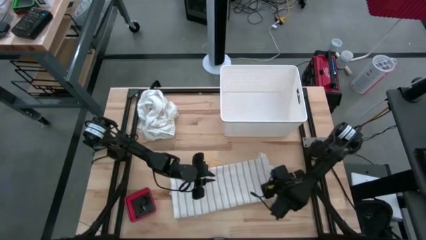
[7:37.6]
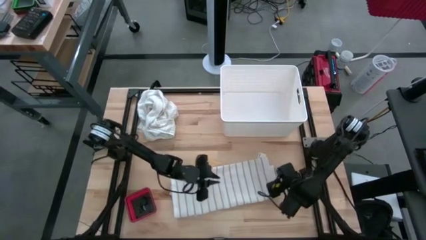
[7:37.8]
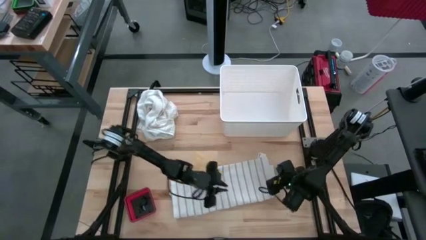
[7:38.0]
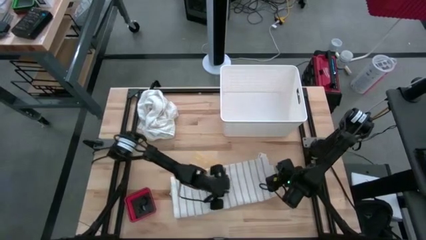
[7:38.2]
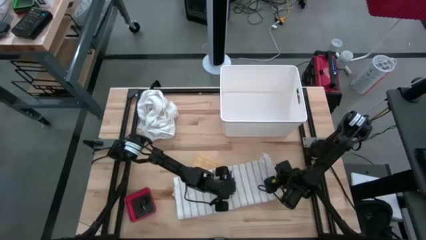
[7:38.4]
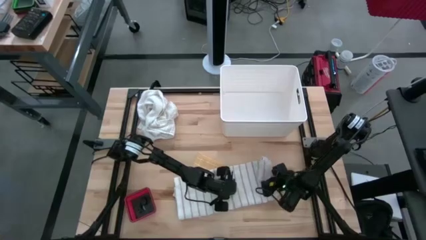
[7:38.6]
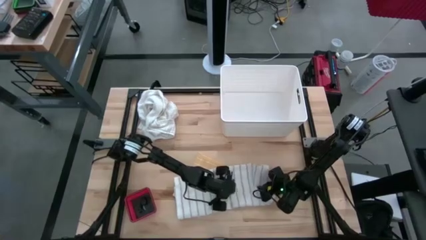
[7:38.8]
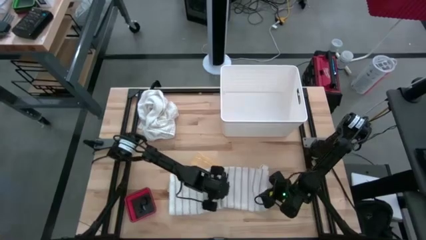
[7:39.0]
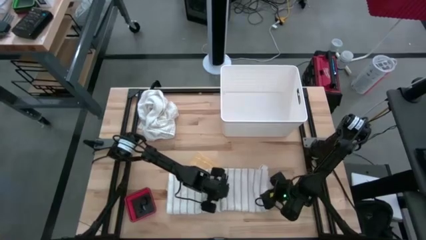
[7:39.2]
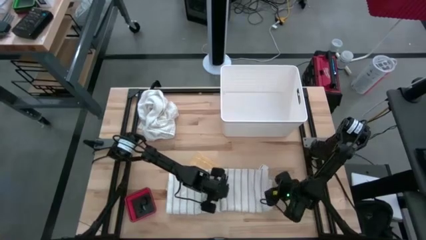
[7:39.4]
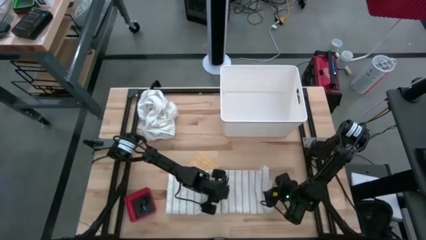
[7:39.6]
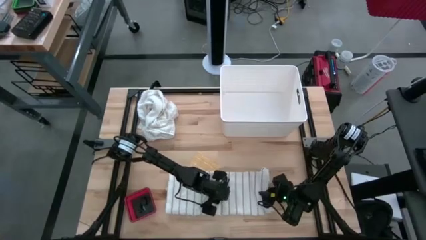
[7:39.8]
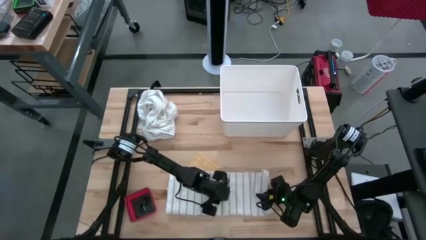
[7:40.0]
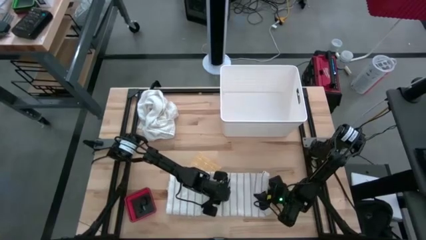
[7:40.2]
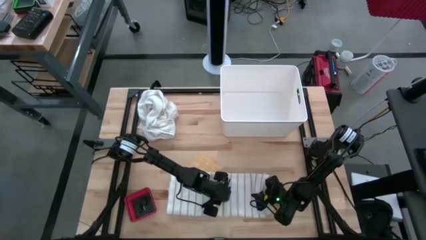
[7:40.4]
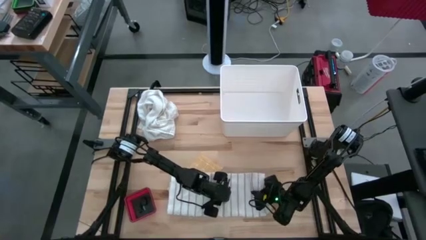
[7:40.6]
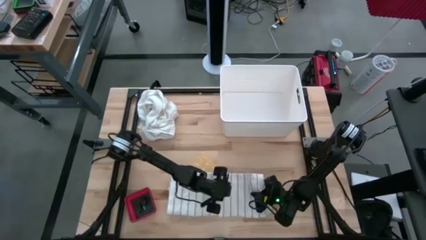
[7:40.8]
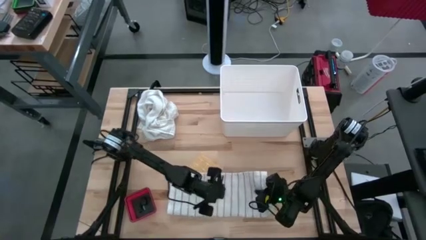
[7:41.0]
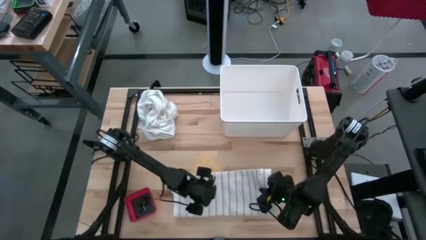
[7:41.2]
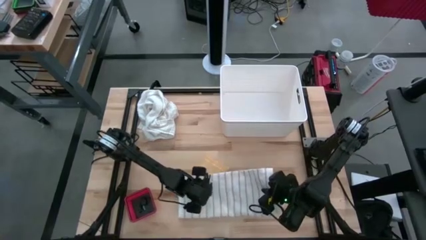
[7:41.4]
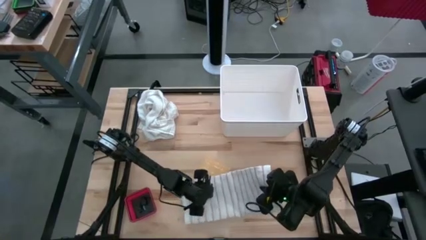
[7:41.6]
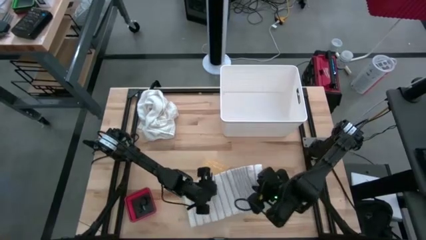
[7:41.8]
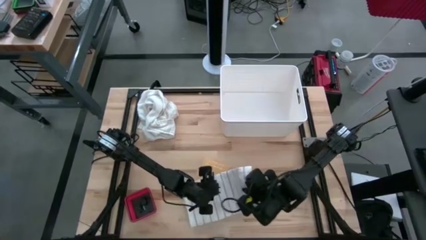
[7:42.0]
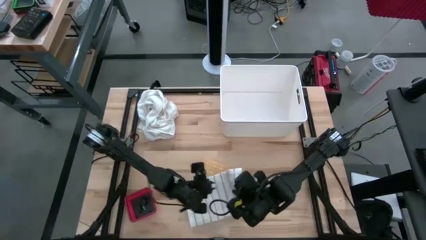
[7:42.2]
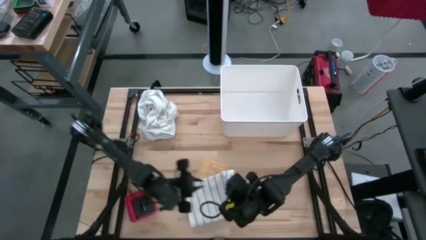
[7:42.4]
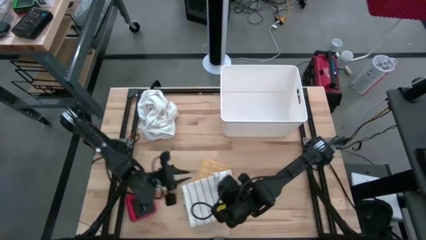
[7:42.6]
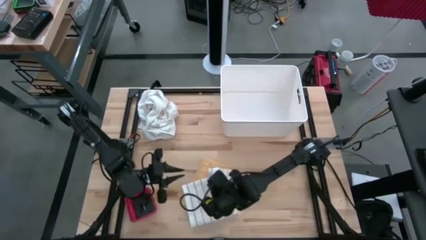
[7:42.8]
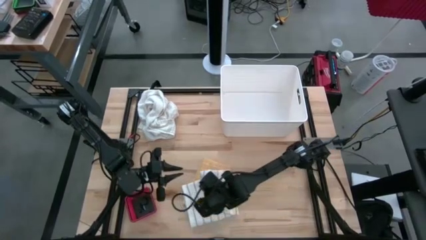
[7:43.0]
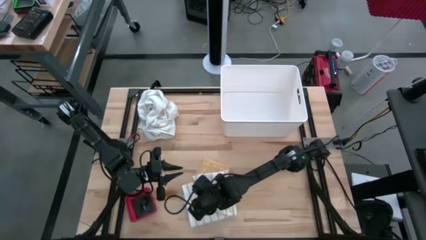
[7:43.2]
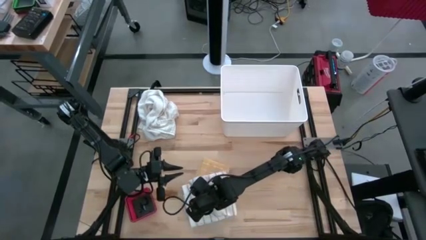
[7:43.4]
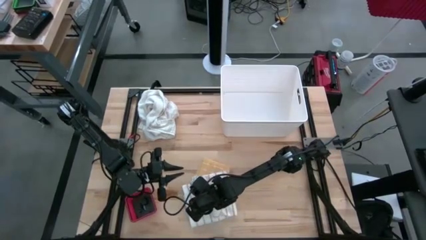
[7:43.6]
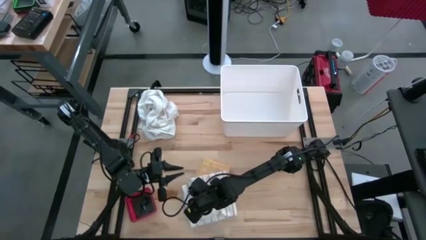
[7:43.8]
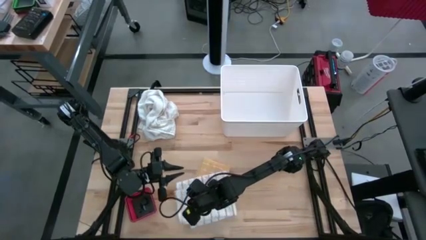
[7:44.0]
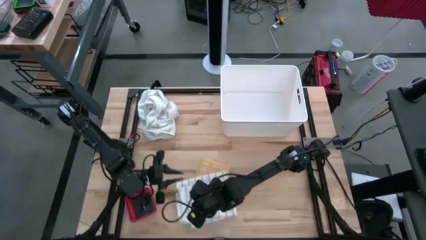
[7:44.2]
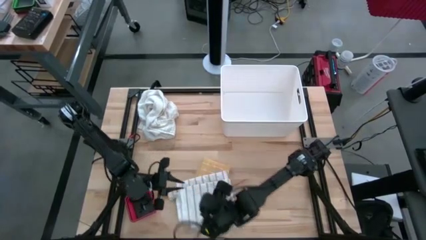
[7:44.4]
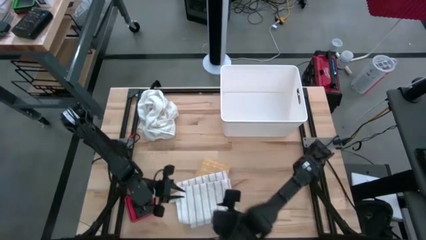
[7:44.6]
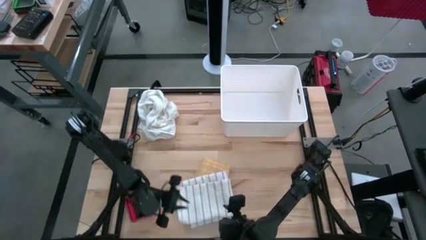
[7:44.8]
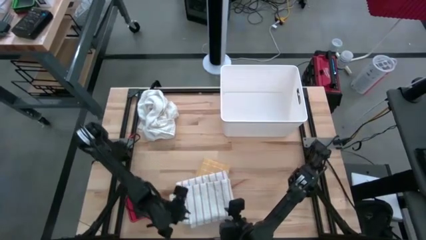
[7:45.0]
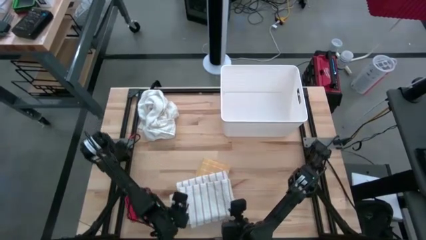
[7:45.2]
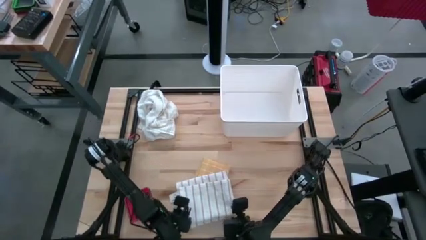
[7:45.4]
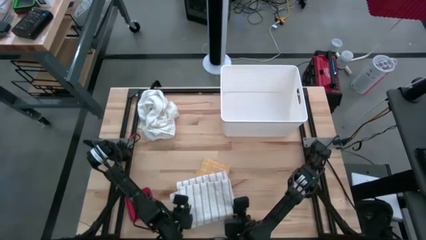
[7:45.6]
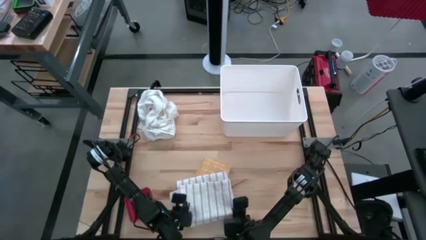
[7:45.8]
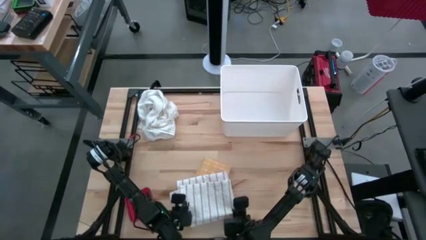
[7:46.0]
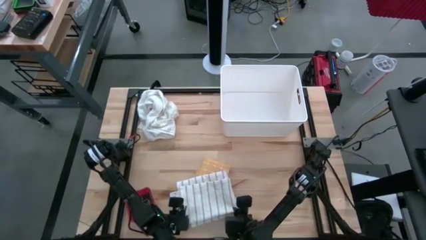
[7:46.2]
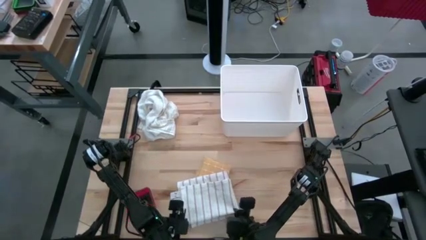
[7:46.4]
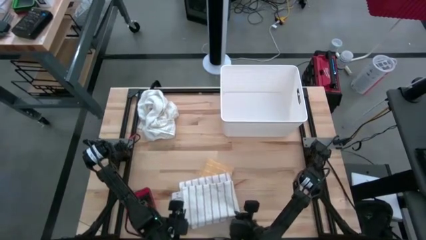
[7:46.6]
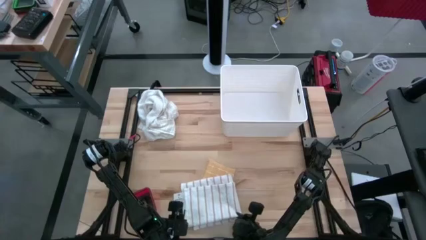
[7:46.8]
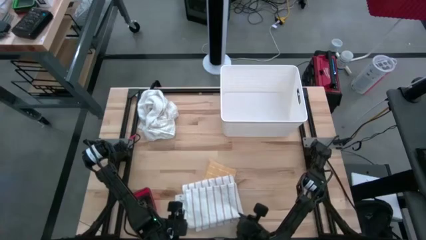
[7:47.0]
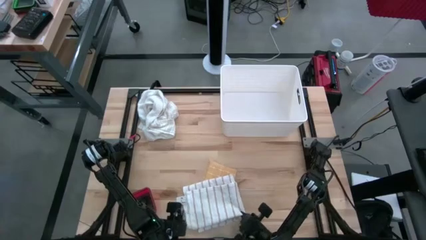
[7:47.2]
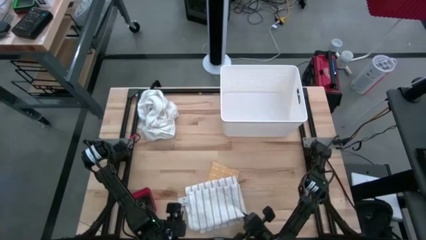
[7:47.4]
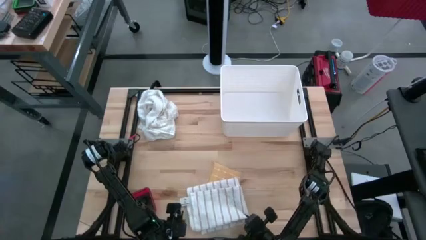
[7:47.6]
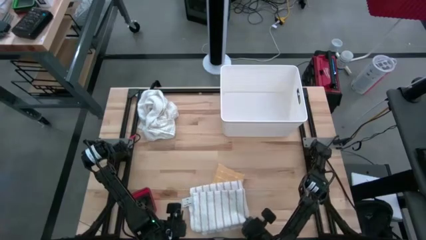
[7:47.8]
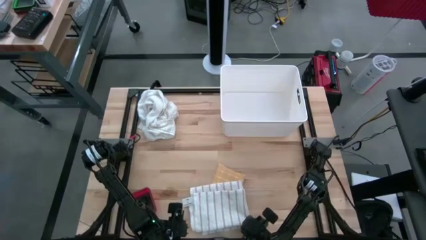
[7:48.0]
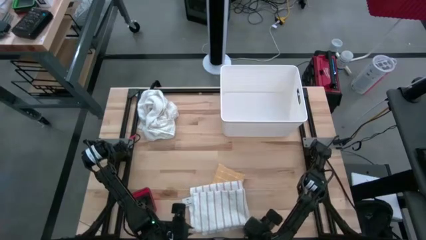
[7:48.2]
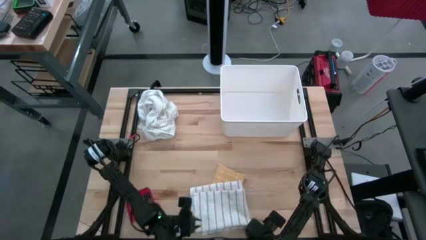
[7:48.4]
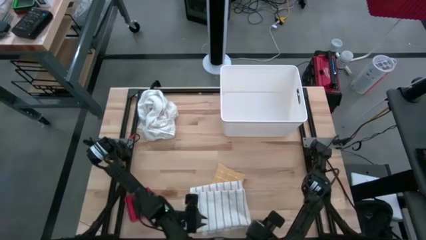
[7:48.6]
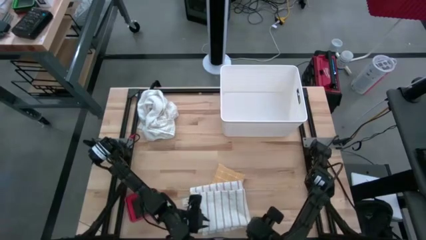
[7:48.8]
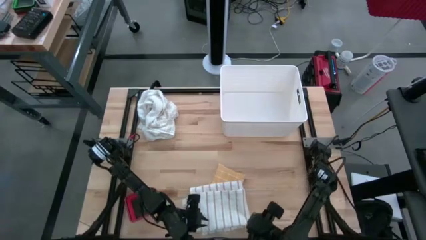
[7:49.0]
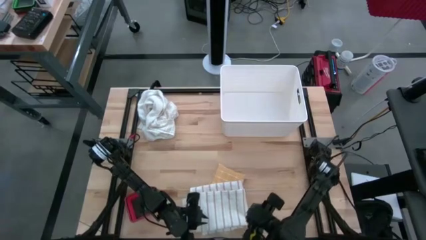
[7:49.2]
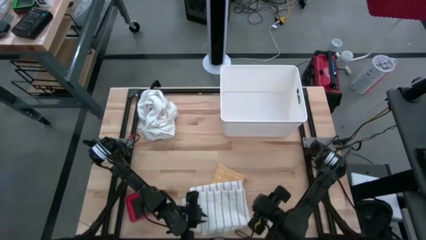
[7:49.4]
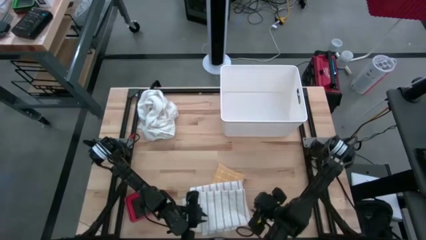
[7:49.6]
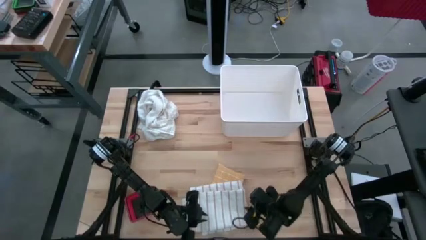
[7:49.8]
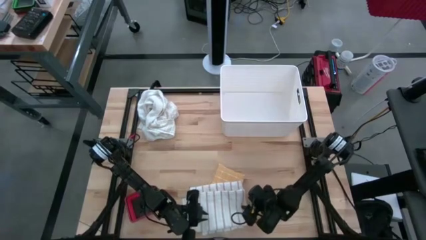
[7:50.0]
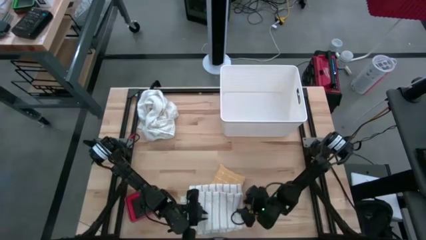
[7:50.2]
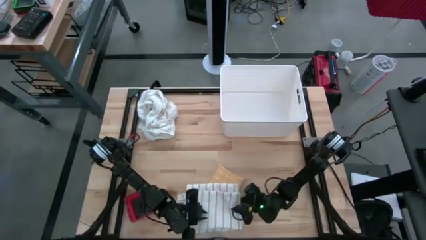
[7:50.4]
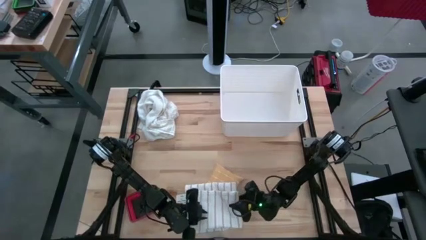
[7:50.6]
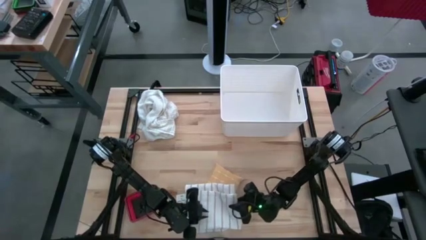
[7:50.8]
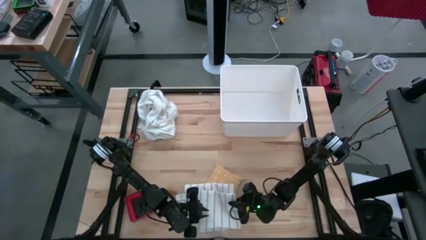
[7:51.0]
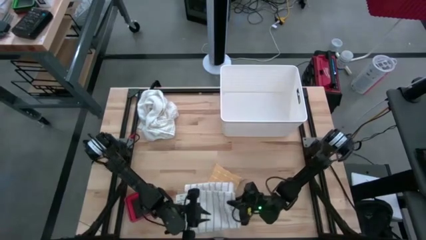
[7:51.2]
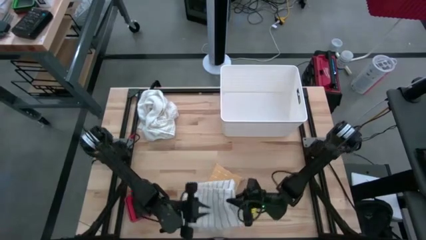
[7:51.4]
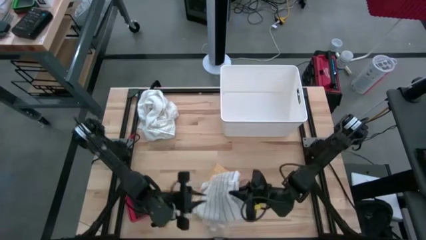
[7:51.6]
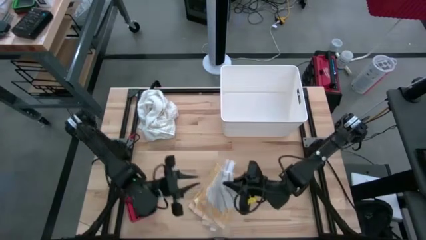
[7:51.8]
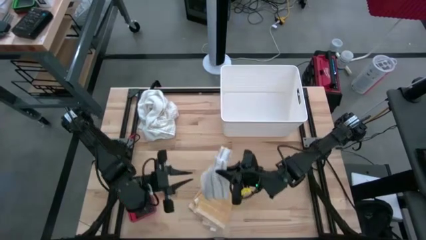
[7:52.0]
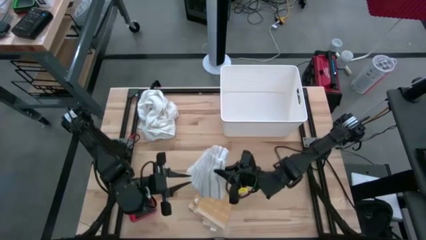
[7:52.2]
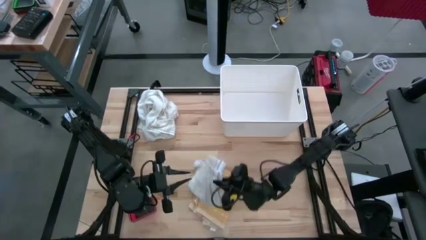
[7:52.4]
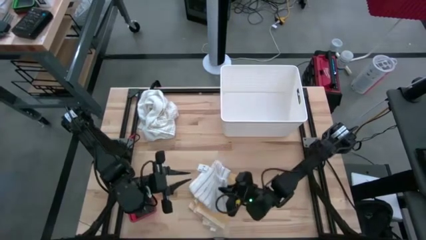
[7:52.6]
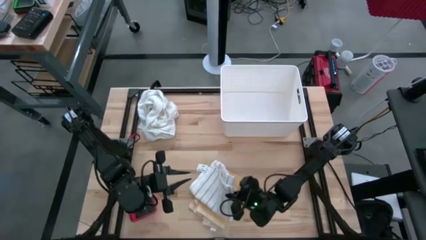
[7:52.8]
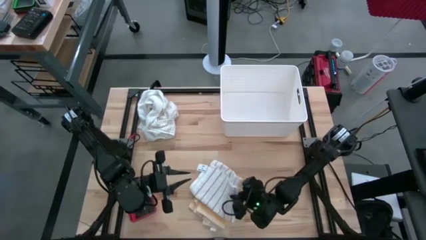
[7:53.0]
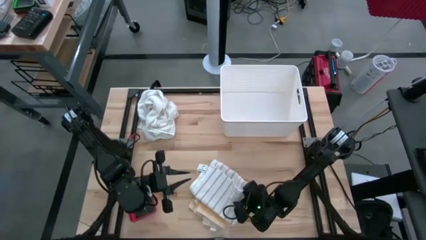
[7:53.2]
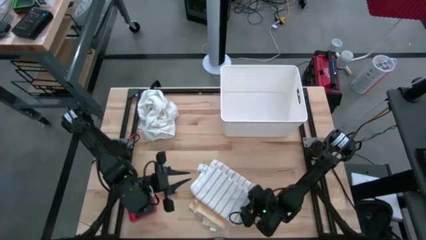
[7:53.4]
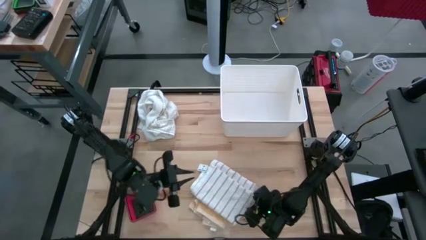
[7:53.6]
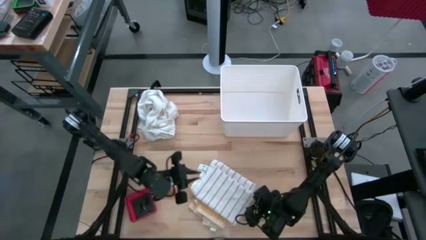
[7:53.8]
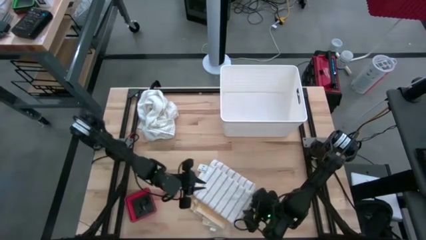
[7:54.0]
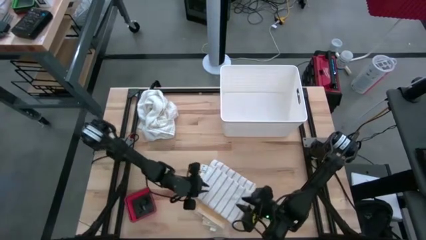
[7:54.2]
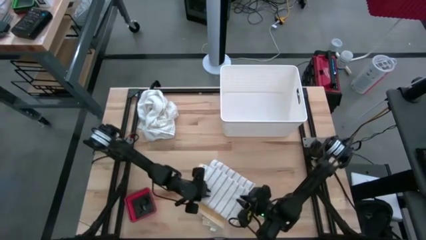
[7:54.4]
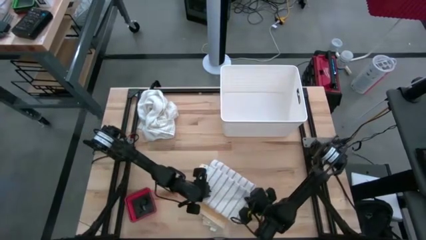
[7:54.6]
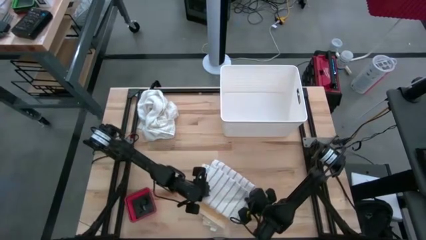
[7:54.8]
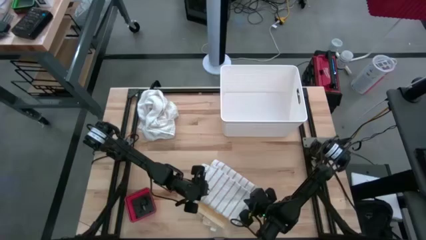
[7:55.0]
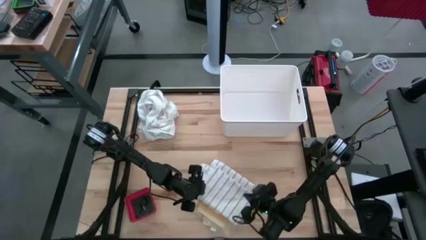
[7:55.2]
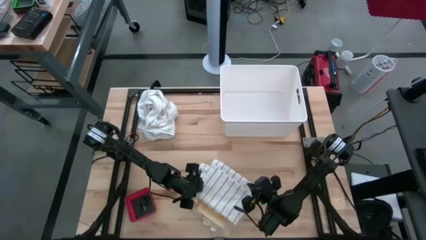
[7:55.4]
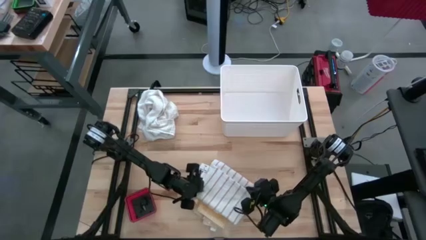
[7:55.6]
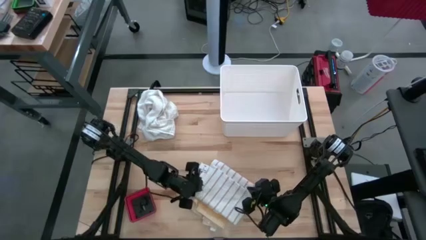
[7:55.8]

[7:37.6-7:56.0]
Task: Fold towel
Fold the white kitchen towel
